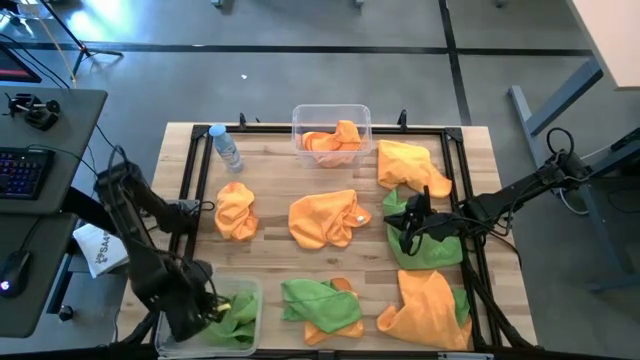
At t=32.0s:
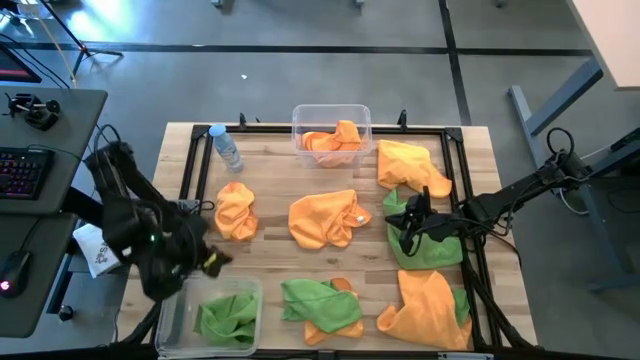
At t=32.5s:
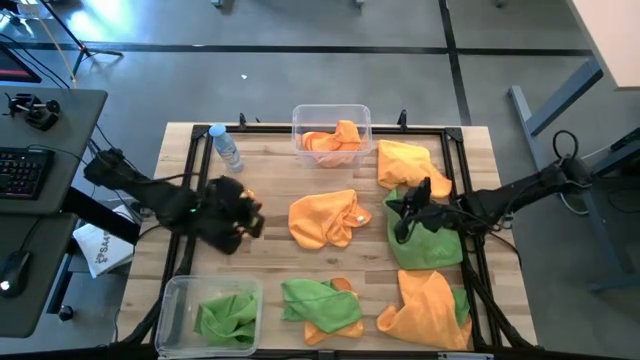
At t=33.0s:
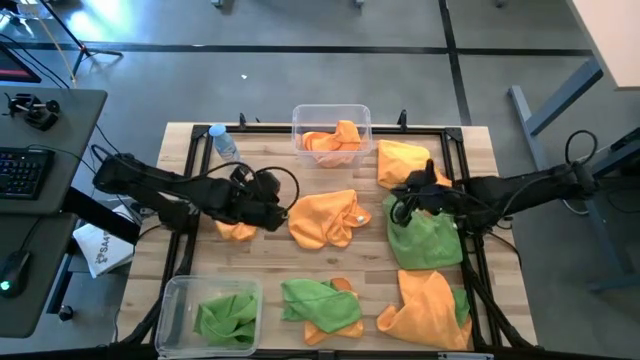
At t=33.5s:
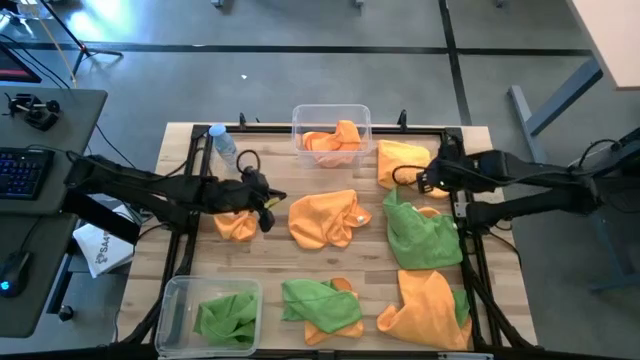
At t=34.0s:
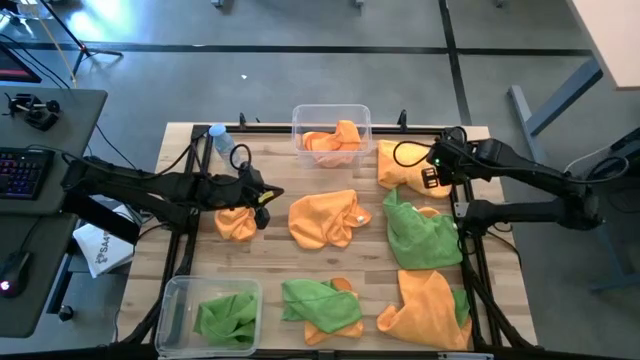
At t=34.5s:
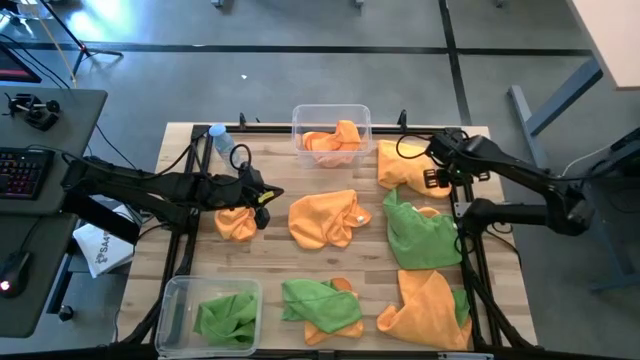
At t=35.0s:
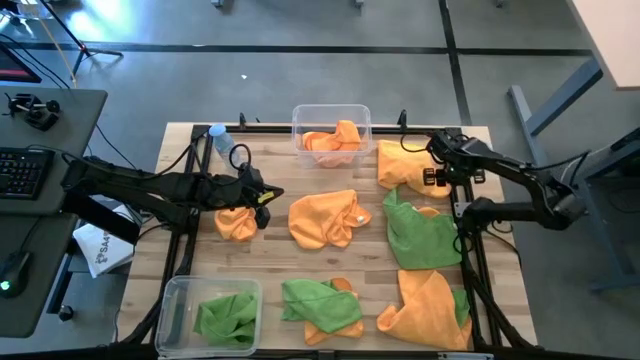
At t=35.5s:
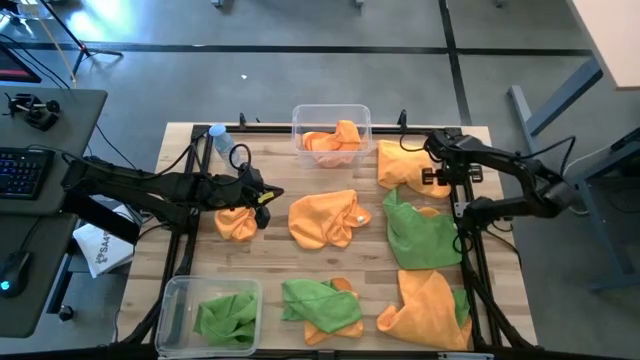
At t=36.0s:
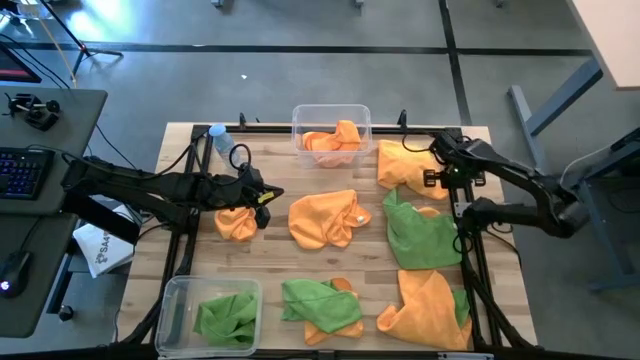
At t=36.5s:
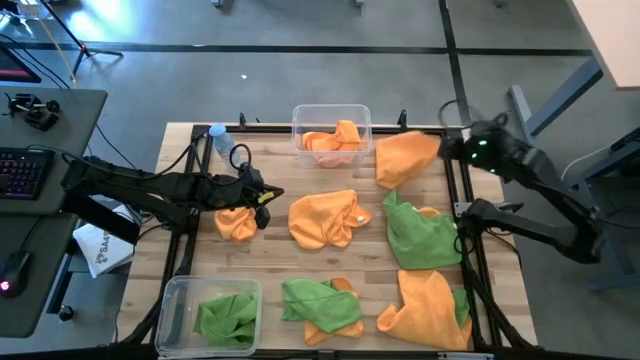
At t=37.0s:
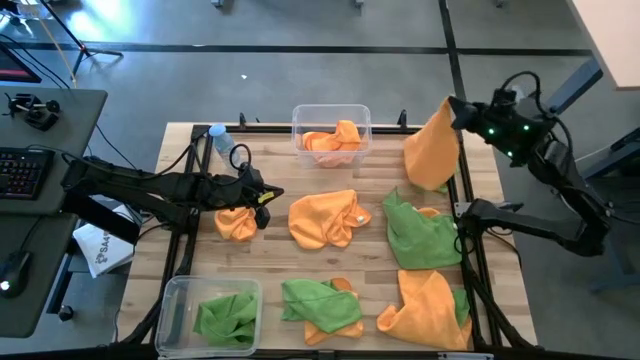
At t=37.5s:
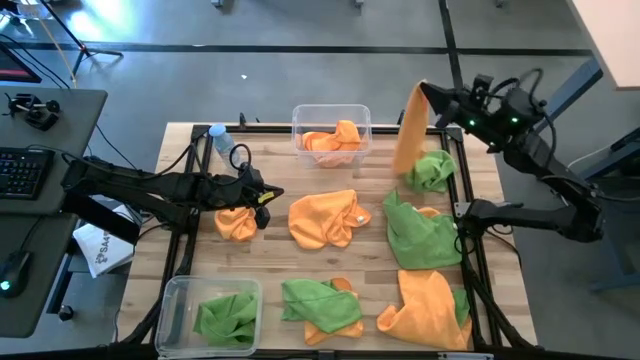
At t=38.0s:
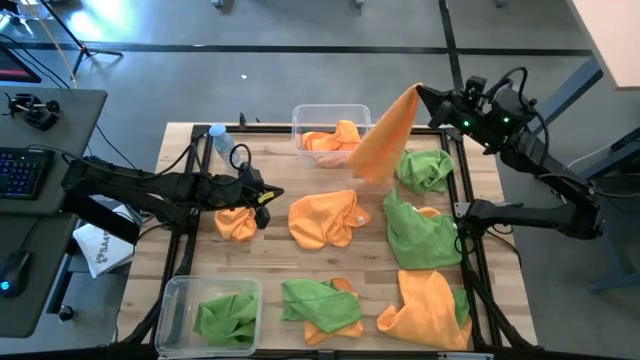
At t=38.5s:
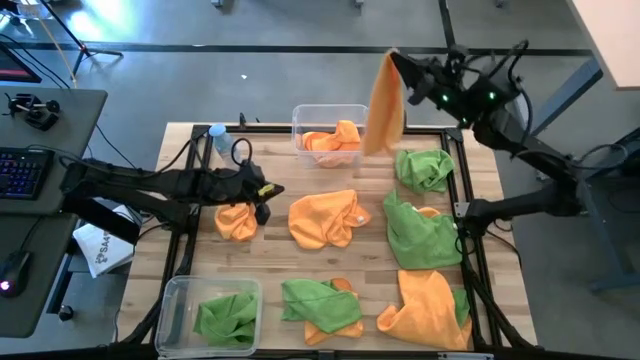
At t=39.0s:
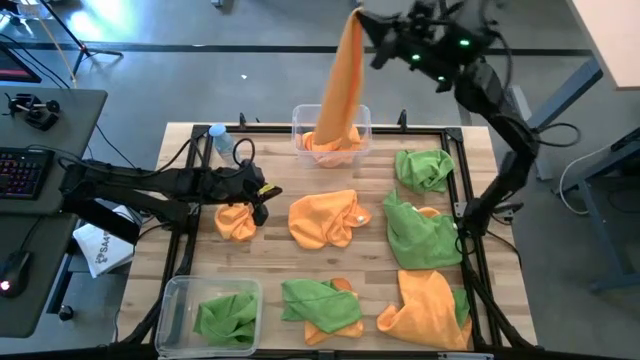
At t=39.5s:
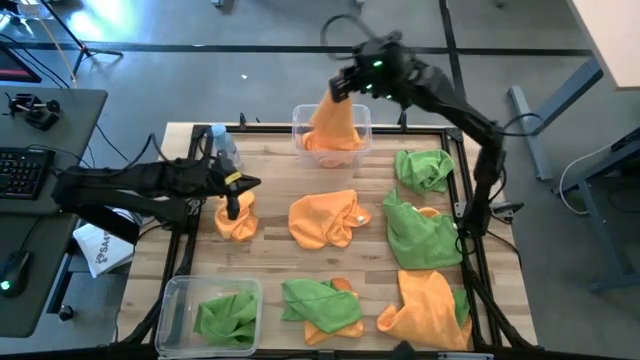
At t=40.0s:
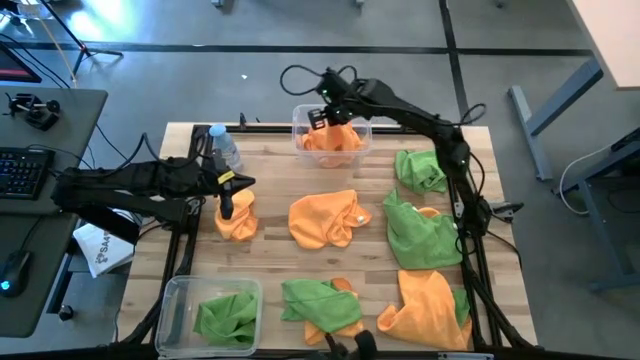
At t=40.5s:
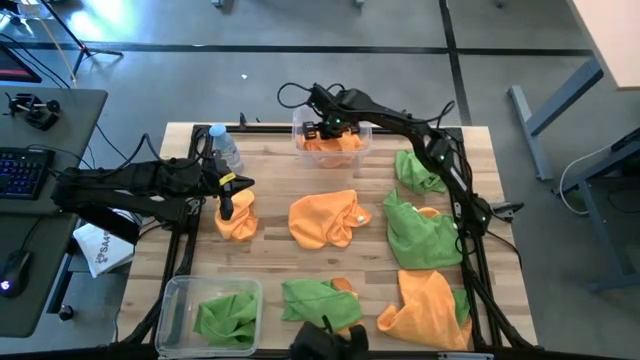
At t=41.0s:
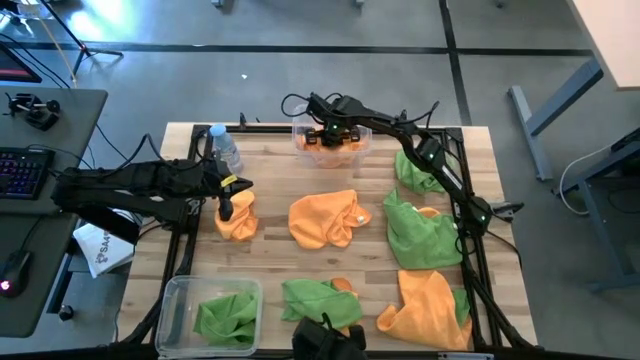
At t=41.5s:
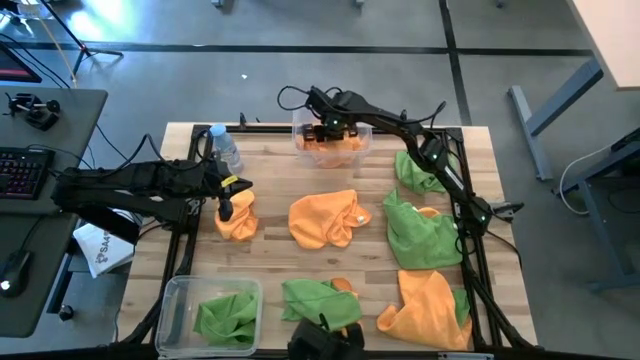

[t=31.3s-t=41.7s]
Task: Sort microfiber towel by color & place in baskets
Put the orange towel into the top transparent bin

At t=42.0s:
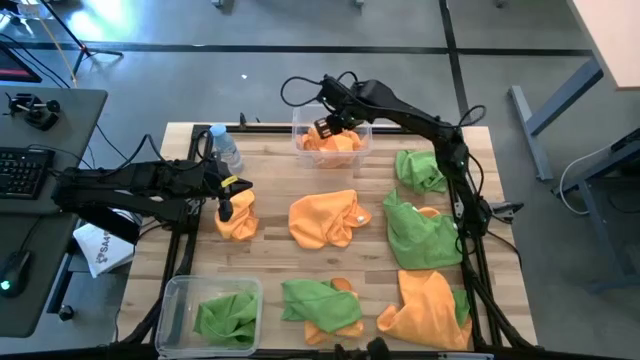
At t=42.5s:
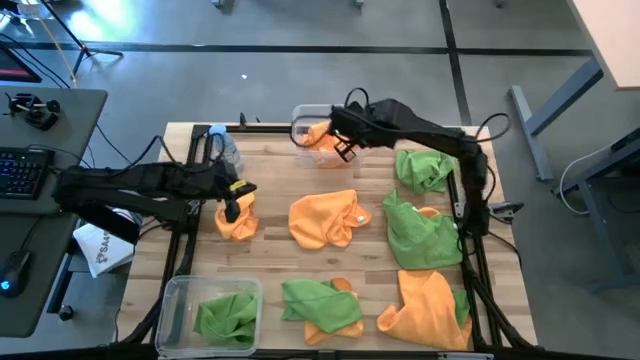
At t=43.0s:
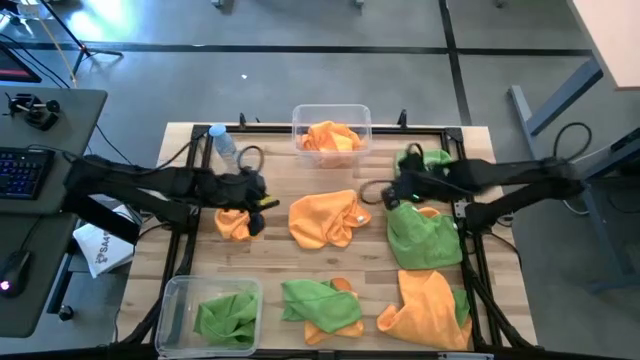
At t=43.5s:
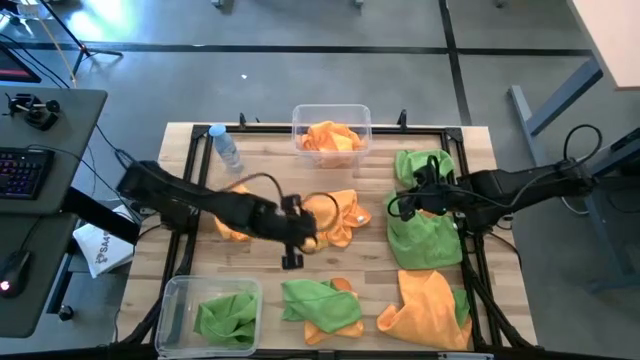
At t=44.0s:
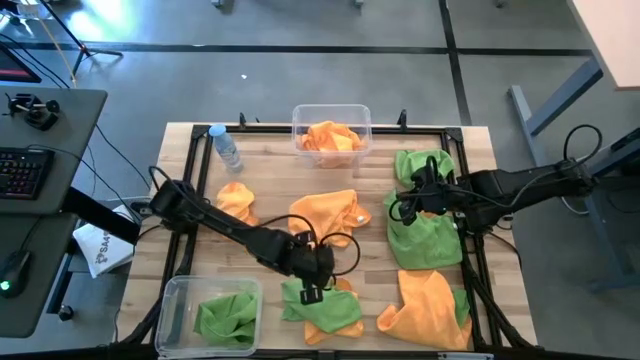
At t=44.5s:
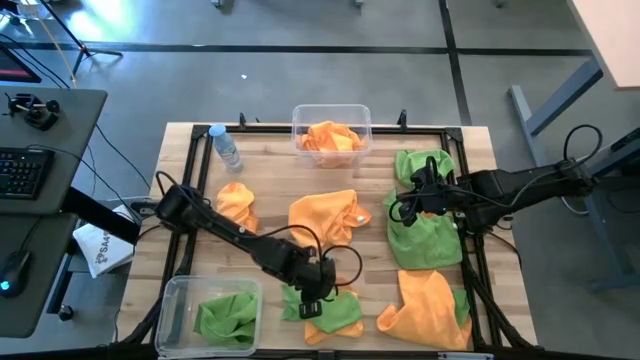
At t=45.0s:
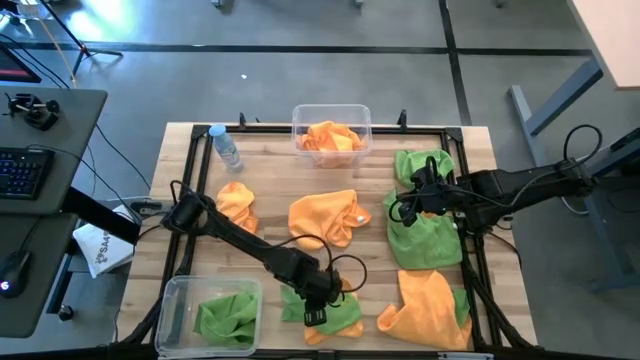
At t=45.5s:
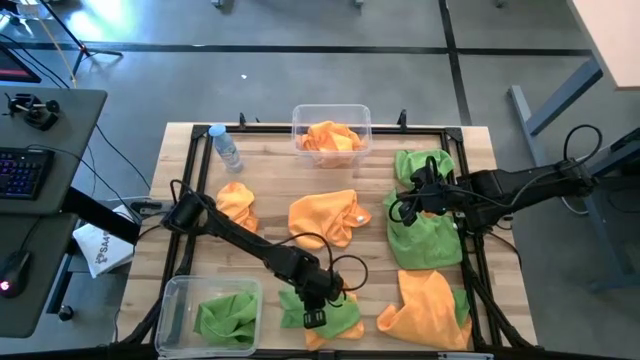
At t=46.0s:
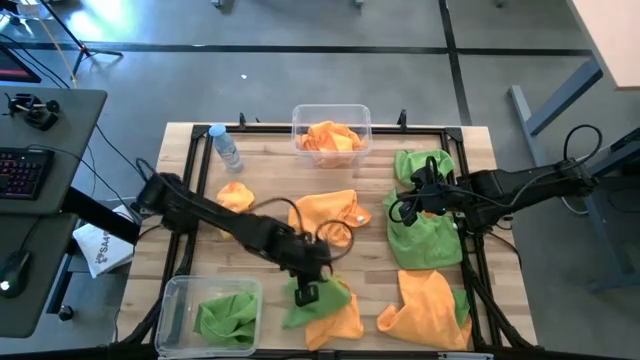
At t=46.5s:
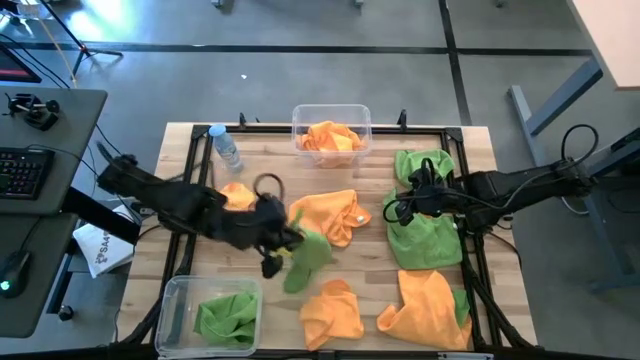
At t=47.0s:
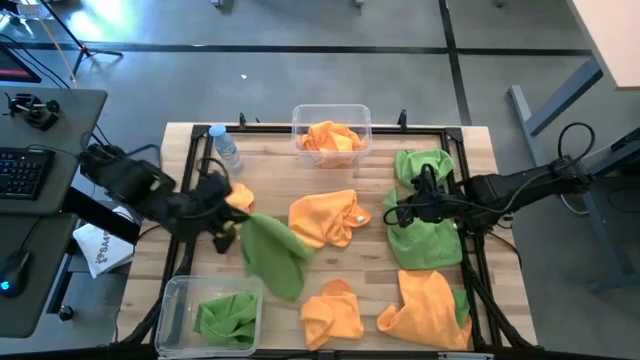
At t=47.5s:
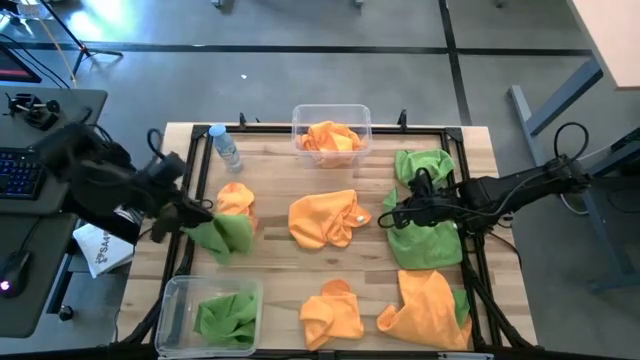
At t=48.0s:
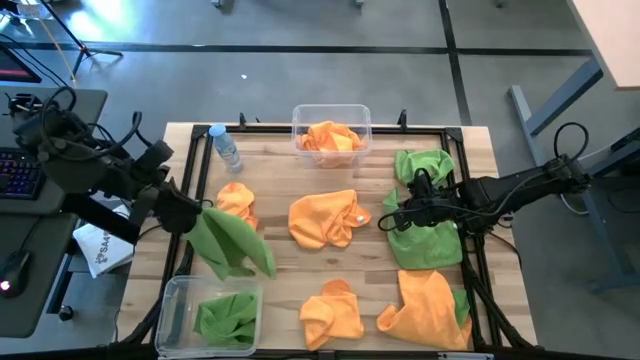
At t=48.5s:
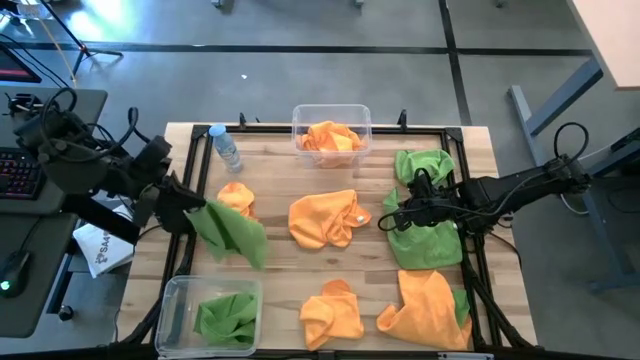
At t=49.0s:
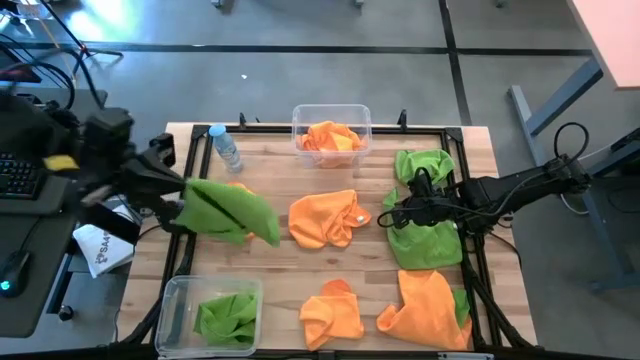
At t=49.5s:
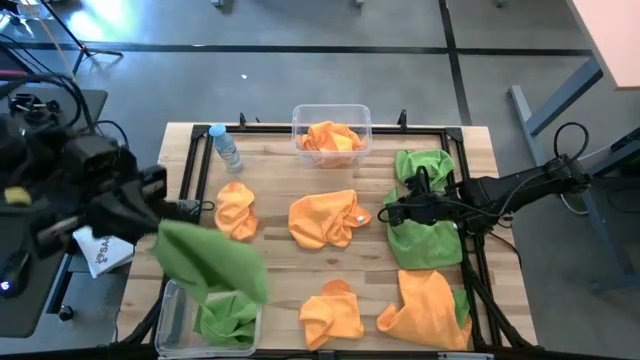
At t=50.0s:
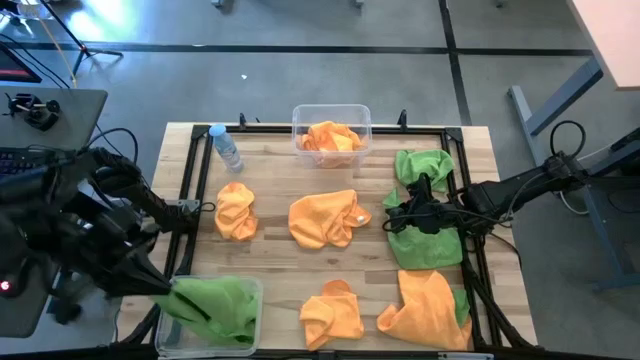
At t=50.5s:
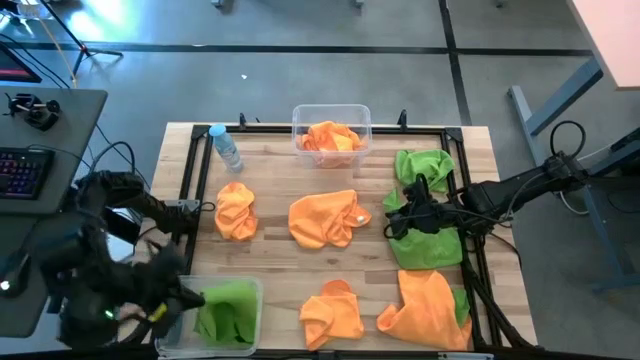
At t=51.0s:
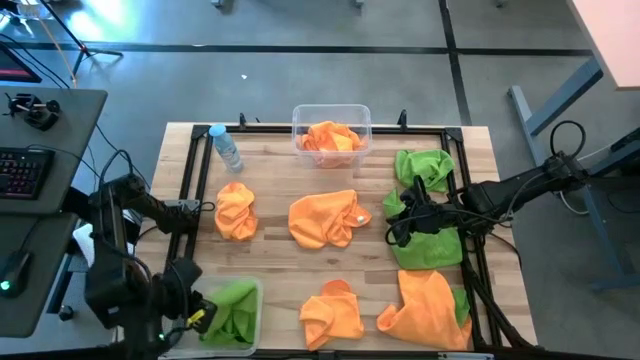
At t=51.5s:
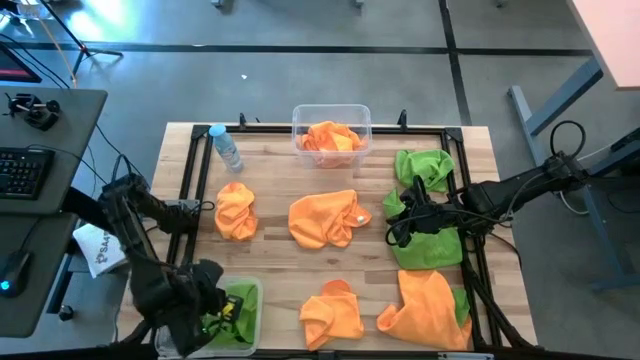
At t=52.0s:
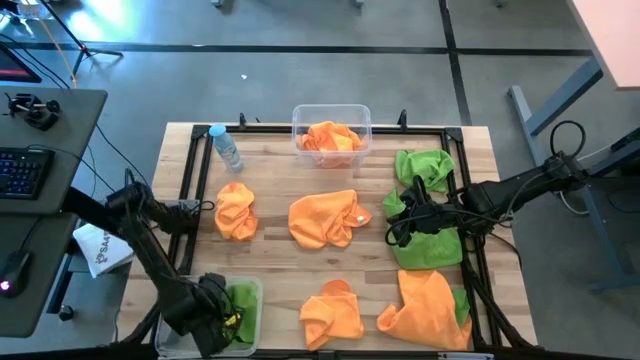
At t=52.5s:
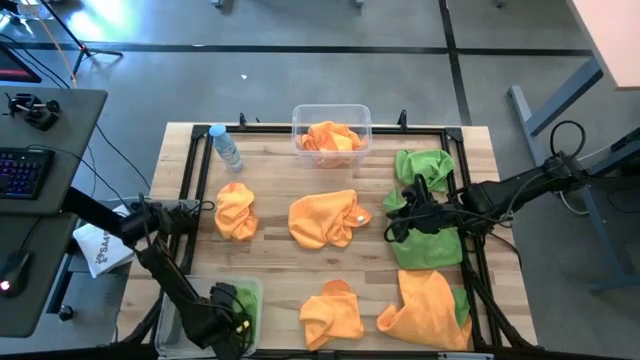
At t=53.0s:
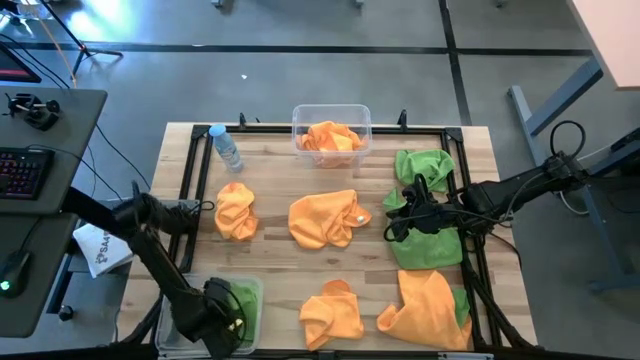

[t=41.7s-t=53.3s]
Put the green towel into the bottom transparent bin
